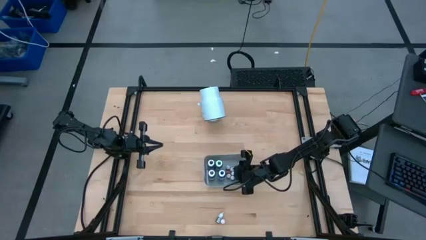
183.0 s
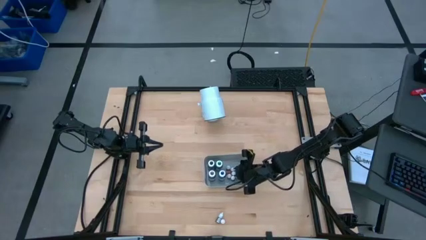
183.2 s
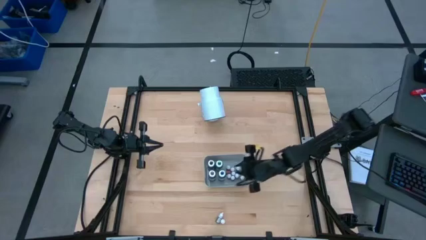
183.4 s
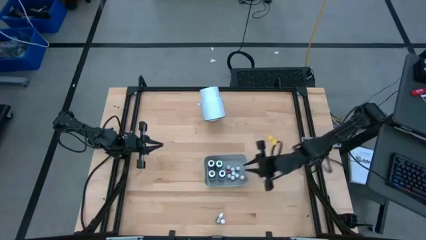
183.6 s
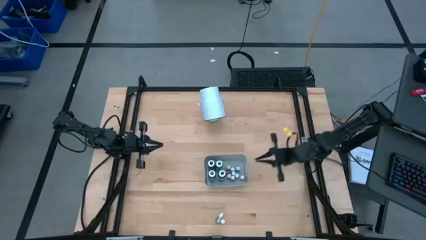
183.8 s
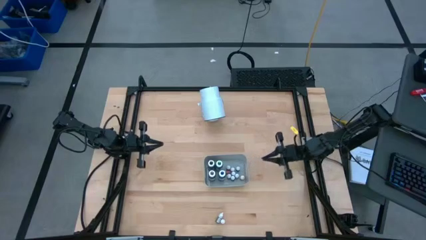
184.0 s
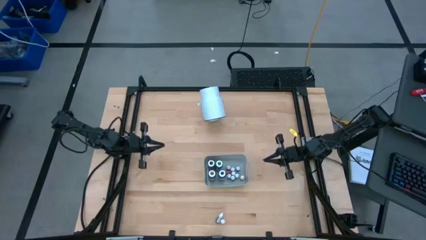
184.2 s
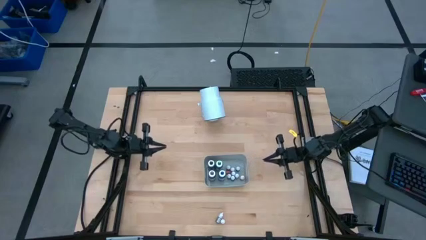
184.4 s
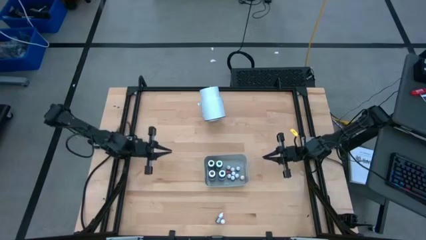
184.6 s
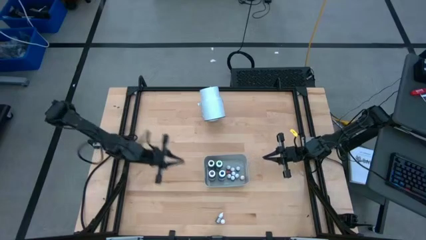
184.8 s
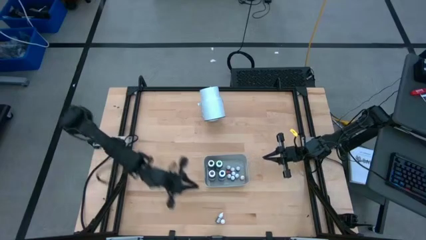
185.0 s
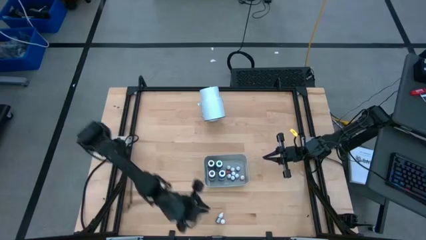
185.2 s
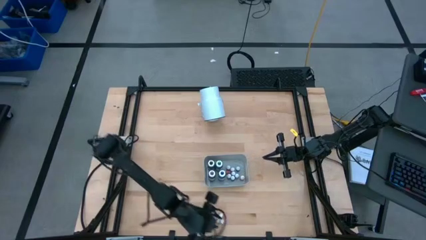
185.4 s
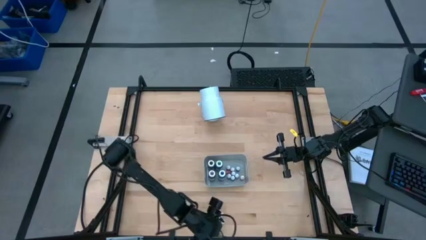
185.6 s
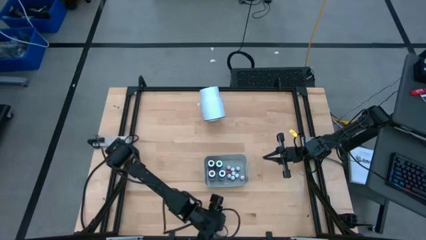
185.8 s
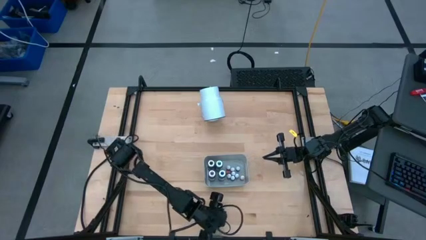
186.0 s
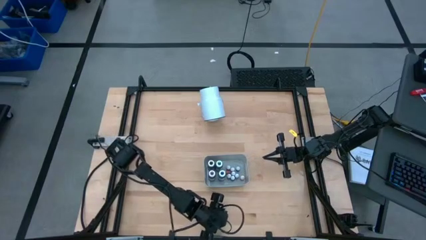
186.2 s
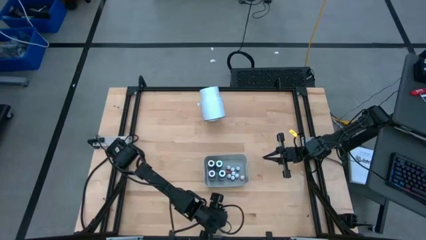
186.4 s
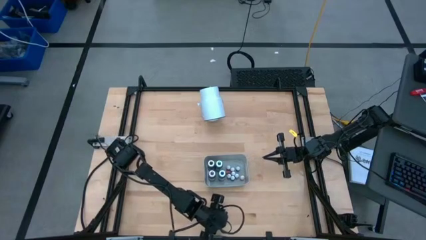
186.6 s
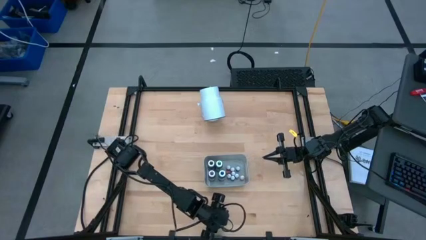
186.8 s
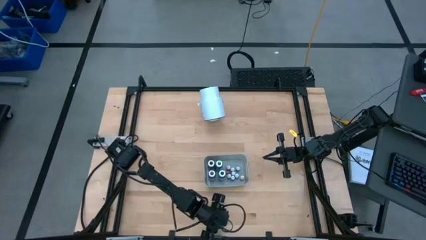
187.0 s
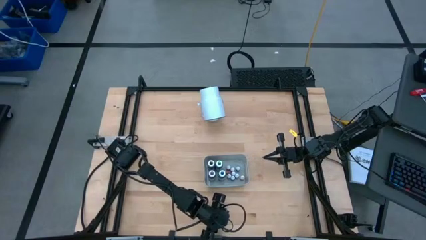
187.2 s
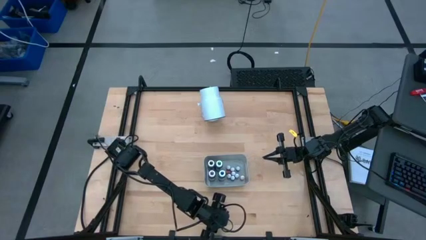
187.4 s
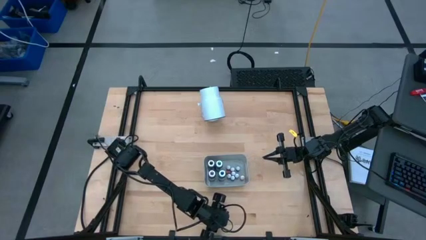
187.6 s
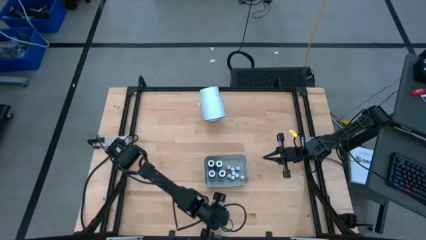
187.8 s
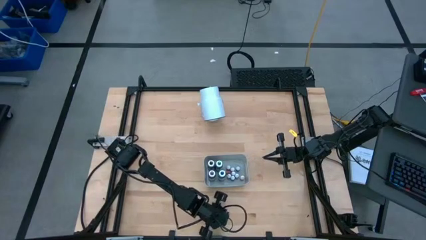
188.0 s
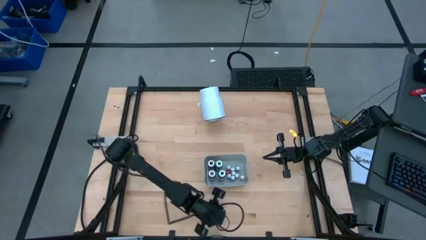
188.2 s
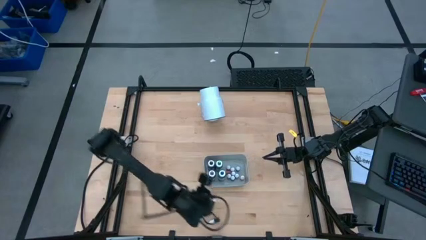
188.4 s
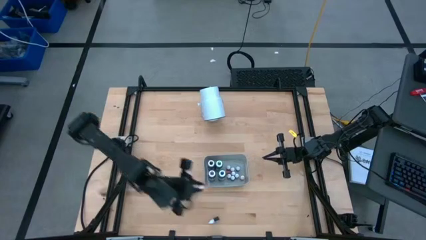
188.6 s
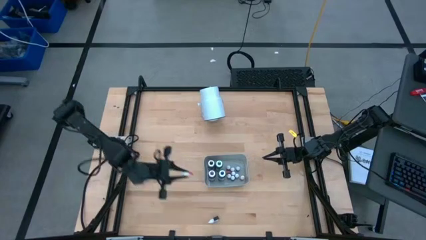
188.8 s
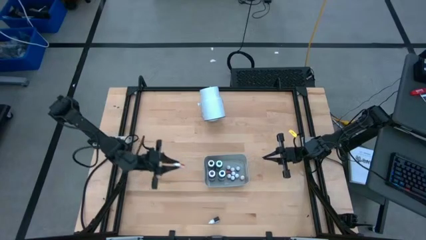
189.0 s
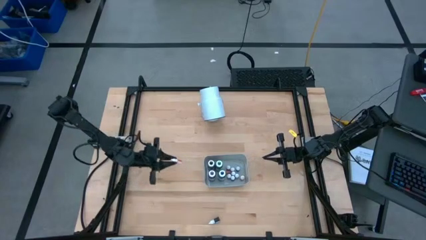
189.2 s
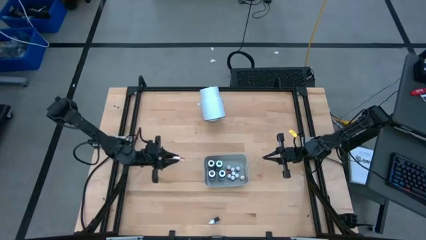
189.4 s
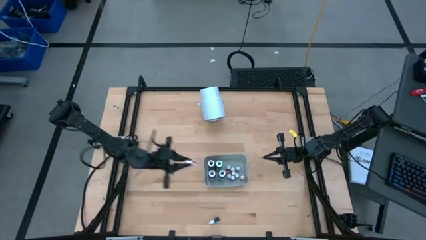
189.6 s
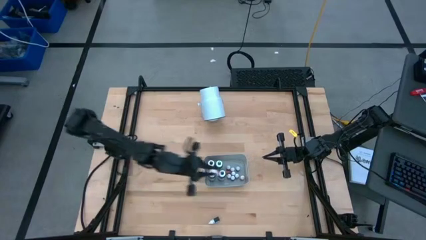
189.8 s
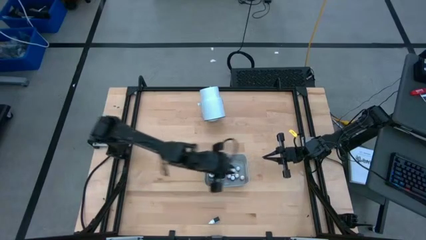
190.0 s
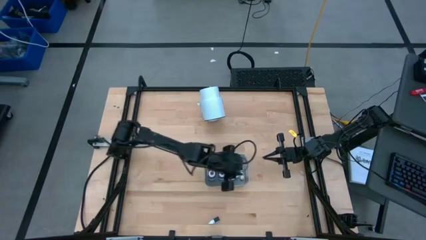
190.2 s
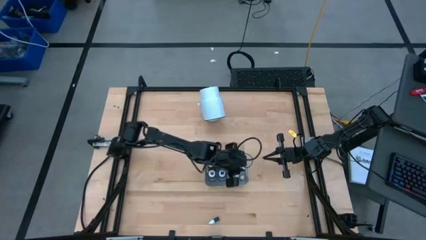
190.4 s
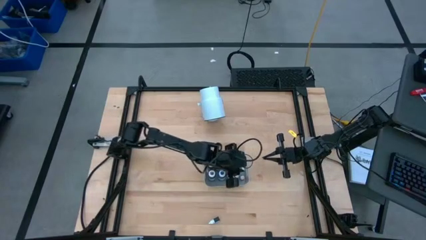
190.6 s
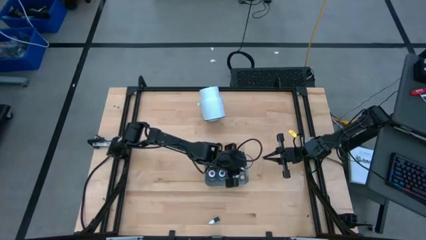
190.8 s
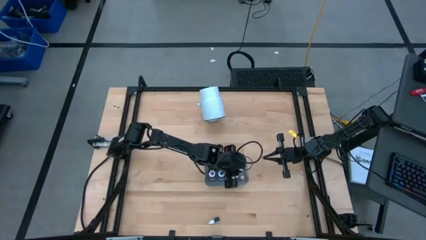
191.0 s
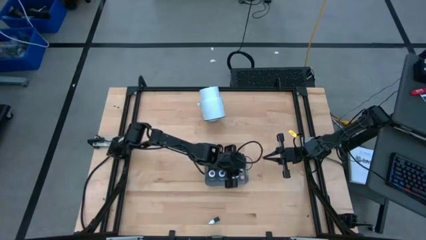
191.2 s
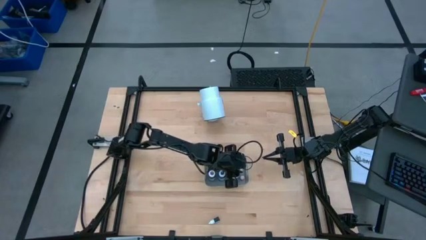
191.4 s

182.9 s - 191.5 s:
Task: Pick & Place food coloring
Put the small yellow food coloring into the gray bin

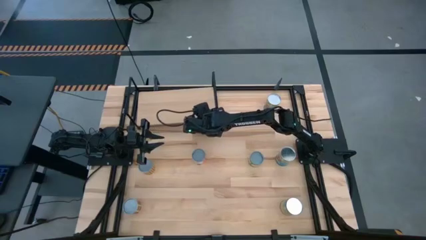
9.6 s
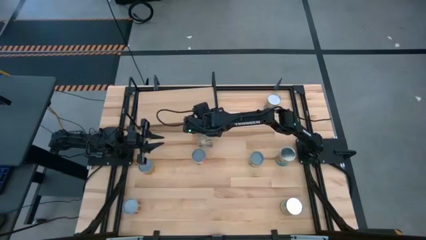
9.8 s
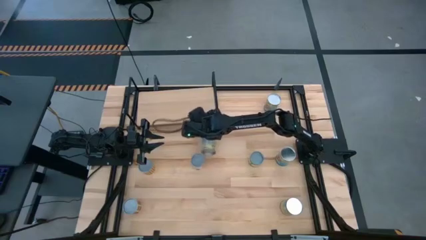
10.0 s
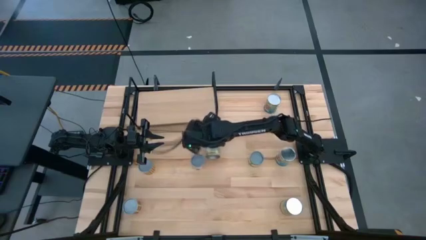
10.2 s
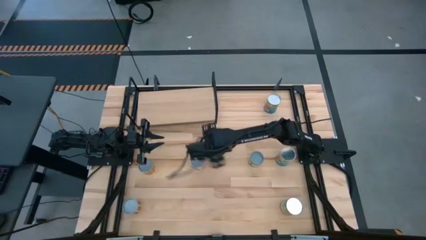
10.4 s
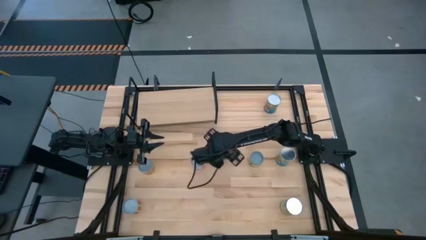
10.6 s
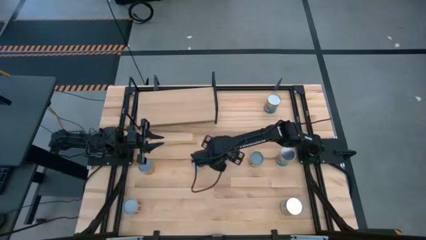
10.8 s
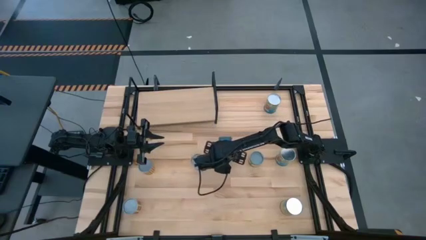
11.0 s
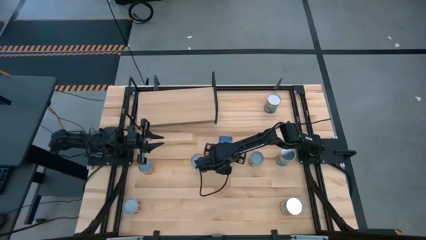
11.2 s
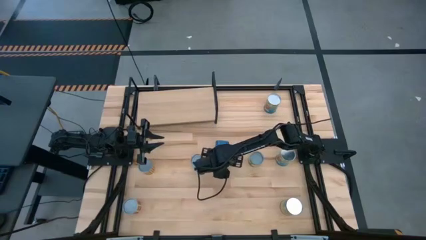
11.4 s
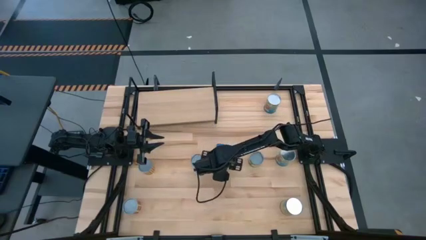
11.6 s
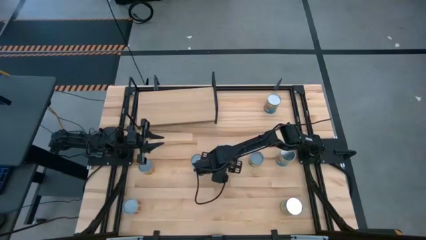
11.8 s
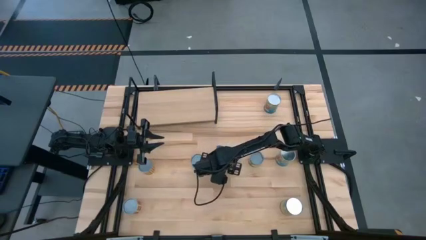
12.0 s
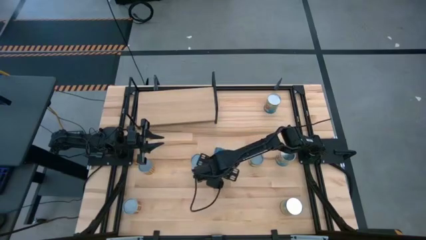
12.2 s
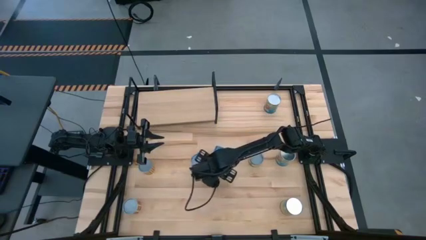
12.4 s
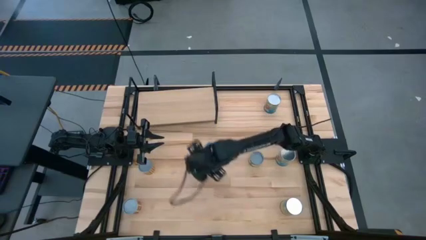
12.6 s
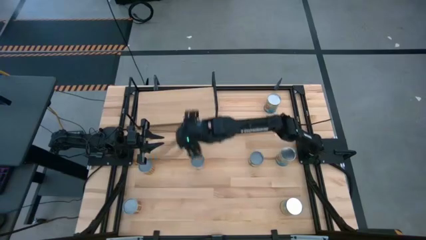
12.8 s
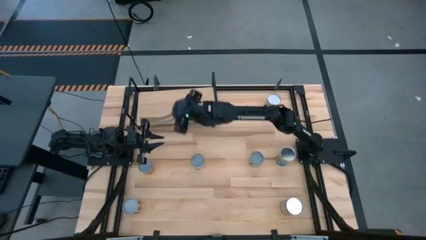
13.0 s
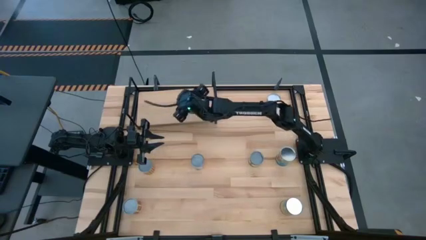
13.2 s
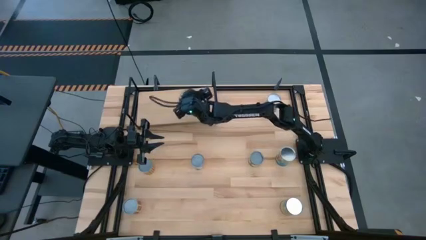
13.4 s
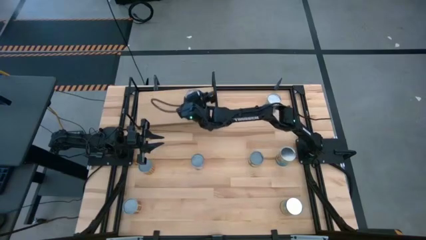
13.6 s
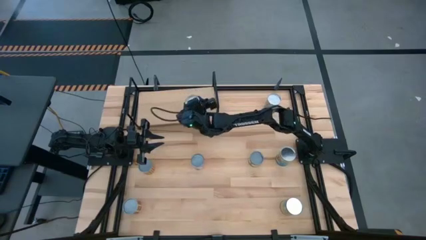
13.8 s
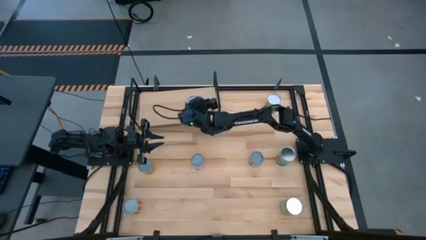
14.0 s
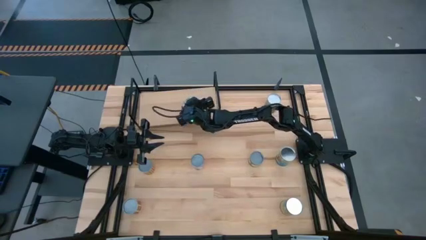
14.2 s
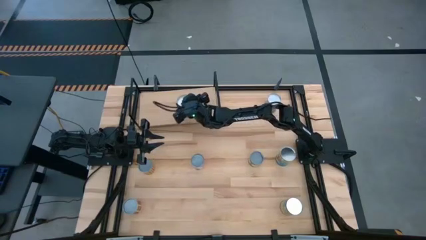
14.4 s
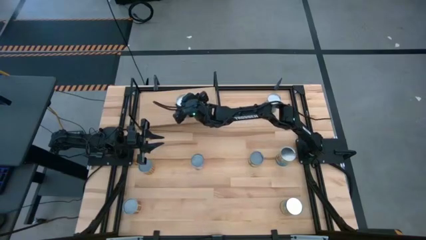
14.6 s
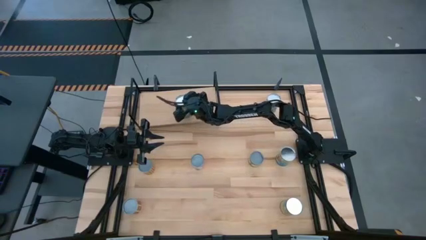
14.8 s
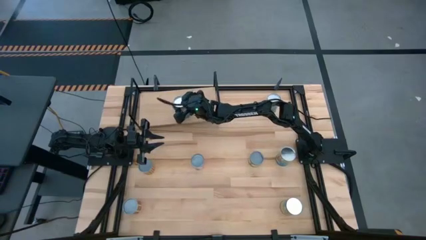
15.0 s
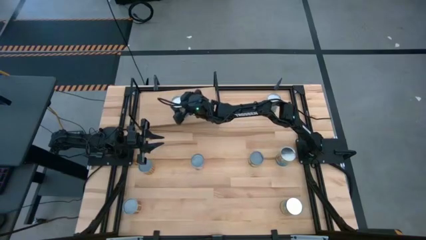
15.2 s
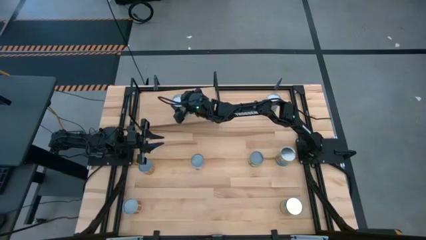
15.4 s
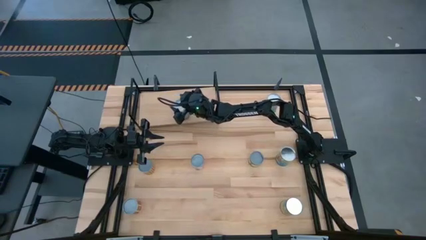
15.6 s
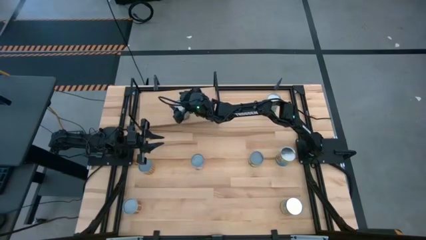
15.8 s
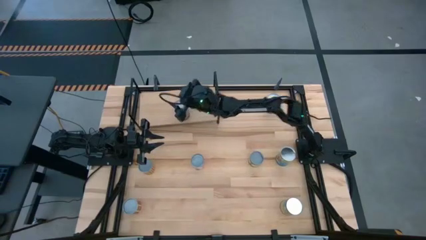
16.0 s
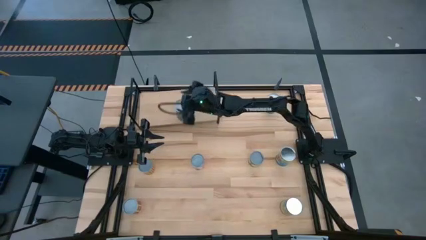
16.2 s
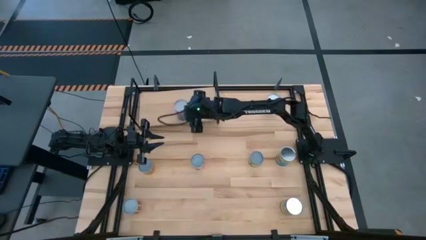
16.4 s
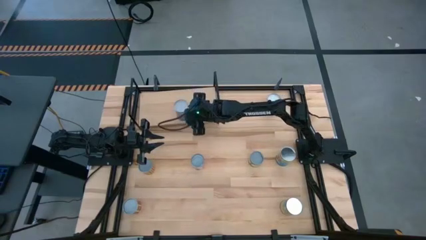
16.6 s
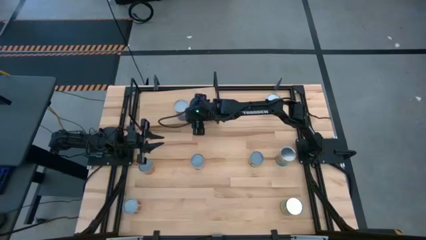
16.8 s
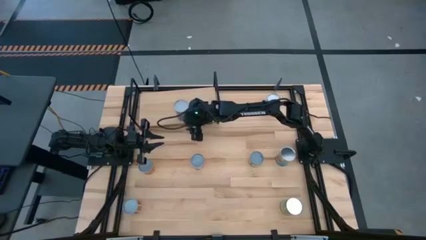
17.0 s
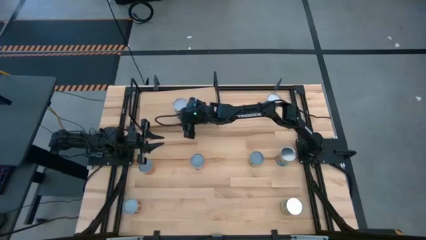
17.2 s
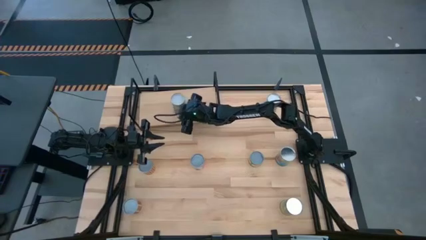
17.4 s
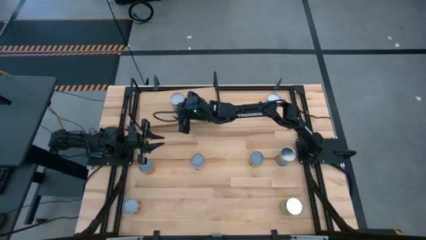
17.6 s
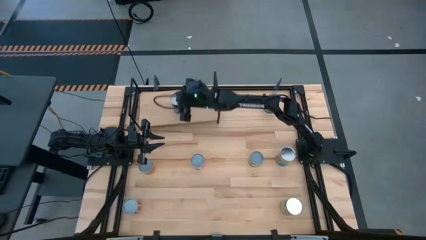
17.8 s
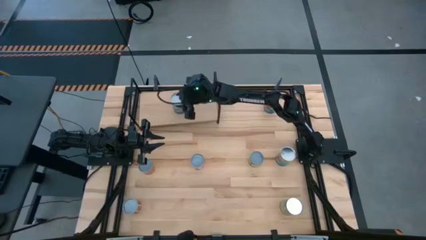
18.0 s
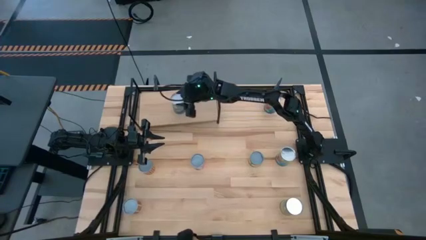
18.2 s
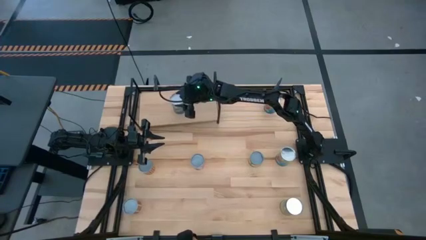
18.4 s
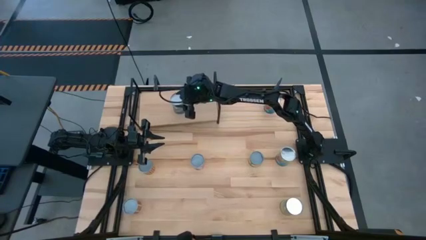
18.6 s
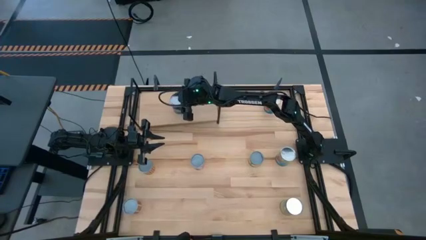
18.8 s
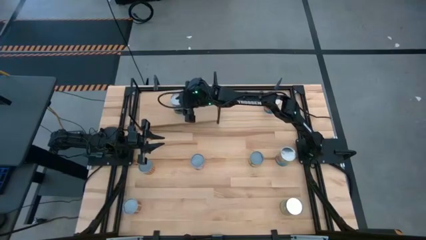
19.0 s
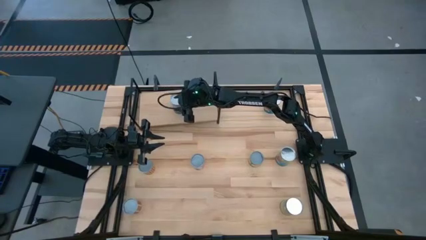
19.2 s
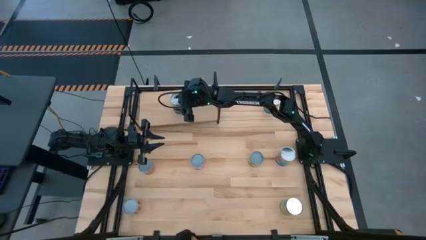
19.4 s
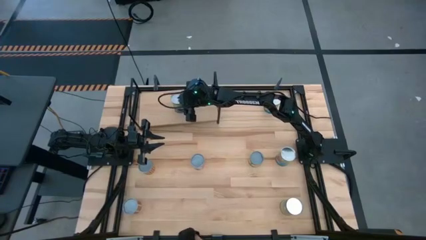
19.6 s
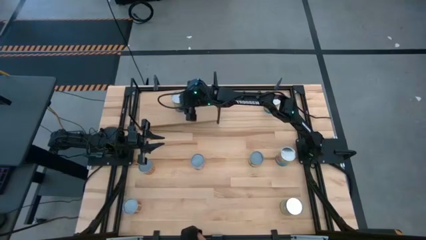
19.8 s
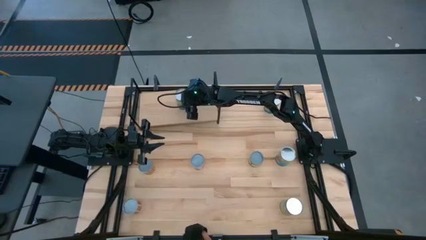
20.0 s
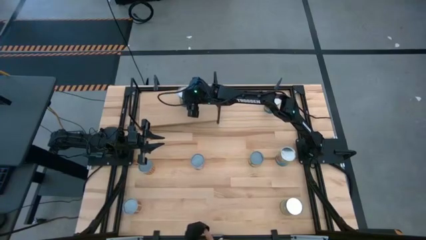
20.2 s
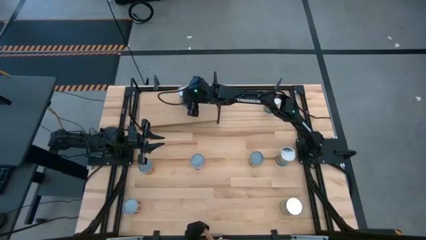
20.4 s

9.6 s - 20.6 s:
Task: Pick and place cans onto a shelf
Put the canned peas on the shelf
